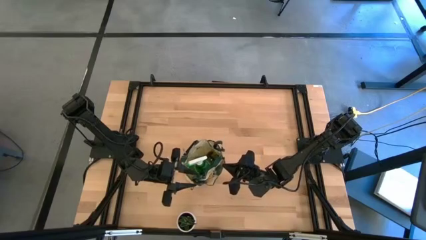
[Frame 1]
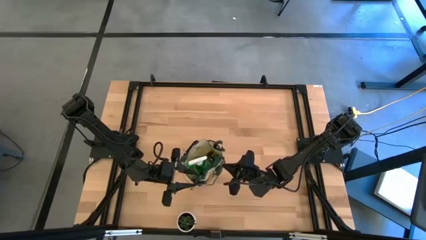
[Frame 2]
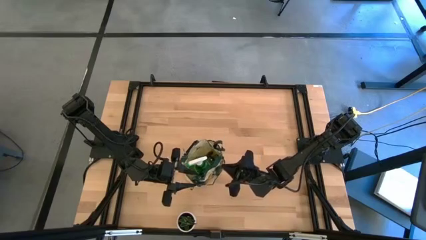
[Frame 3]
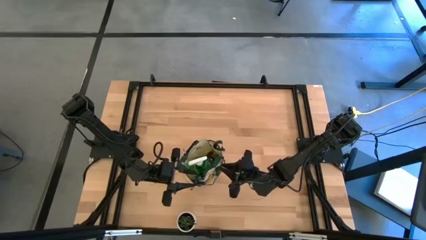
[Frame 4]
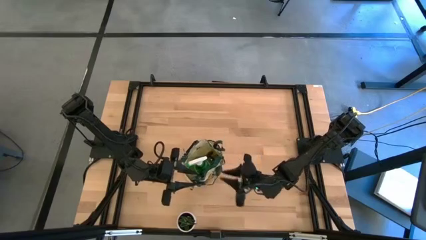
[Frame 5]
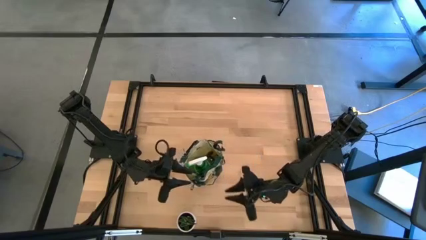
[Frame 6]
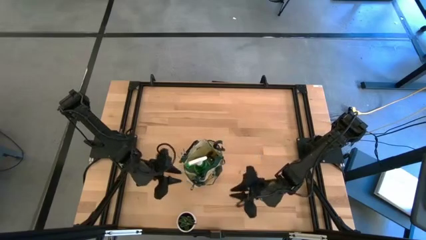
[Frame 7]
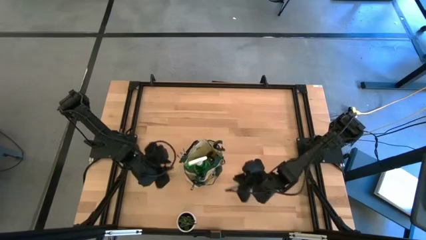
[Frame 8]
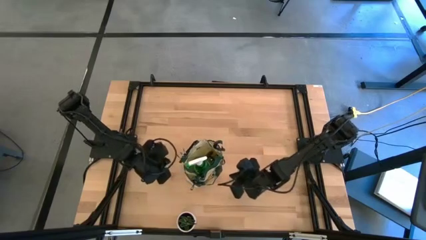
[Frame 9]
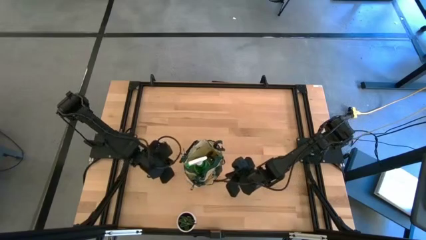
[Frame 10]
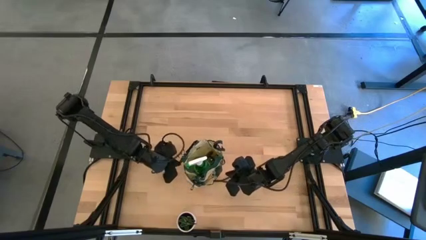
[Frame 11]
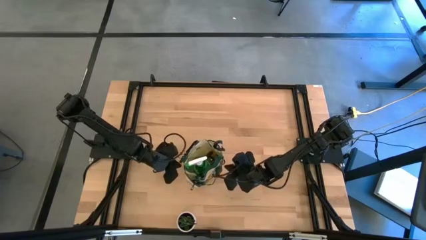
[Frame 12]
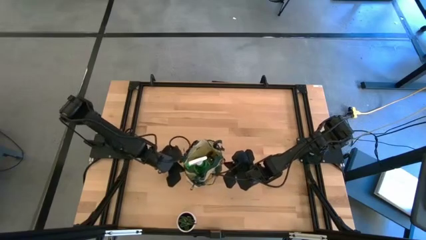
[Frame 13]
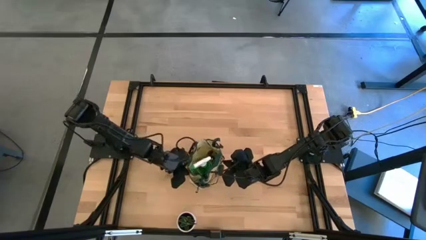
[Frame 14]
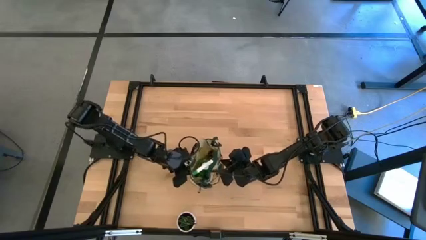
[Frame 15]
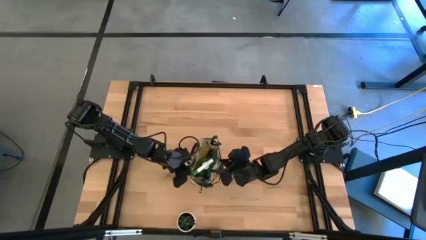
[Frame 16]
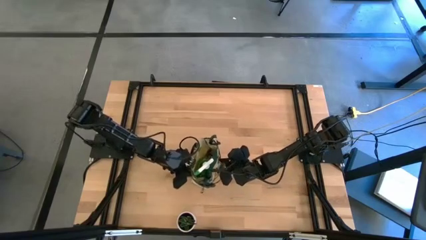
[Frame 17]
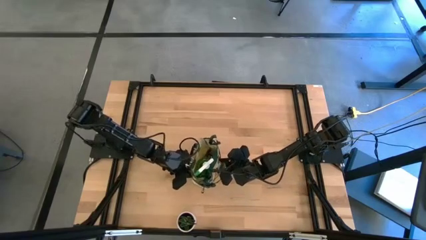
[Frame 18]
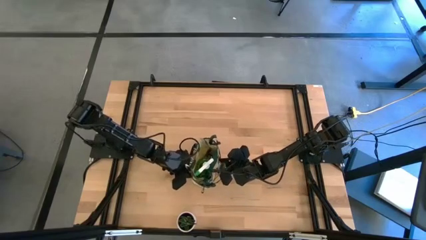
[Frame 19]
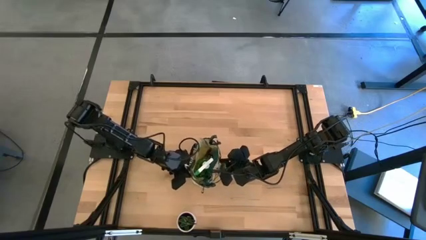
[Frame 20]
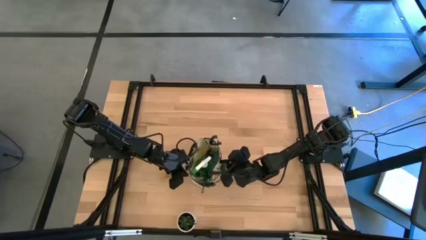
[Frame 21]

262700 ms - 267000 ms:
Task: Pick & Place Garden tools in Gardening bag
Adjust the green gardening bag

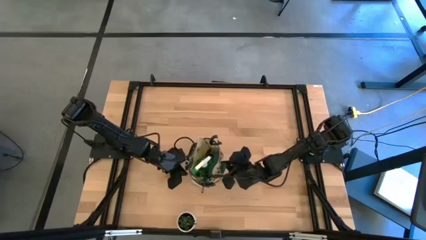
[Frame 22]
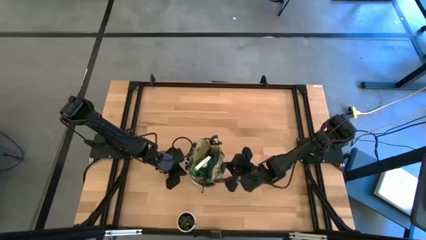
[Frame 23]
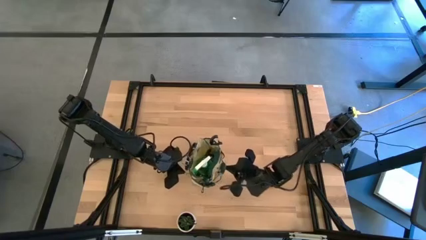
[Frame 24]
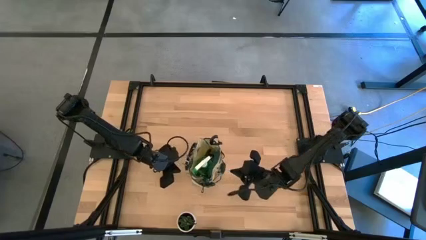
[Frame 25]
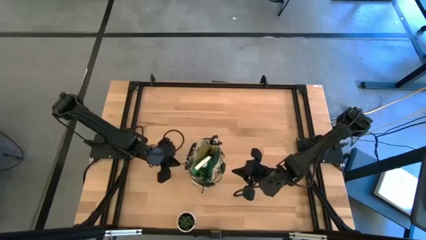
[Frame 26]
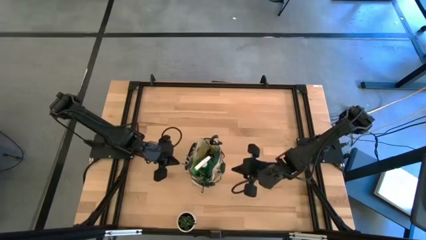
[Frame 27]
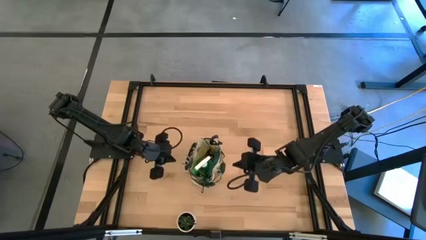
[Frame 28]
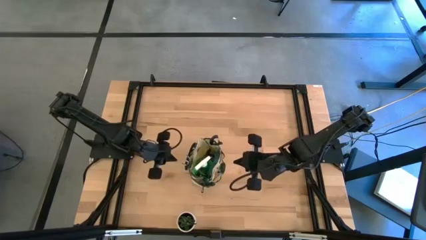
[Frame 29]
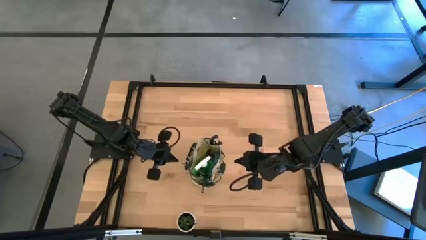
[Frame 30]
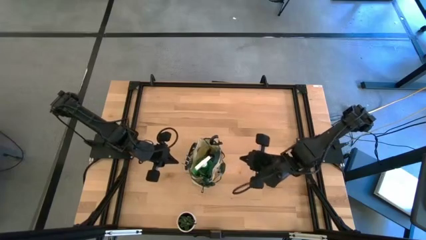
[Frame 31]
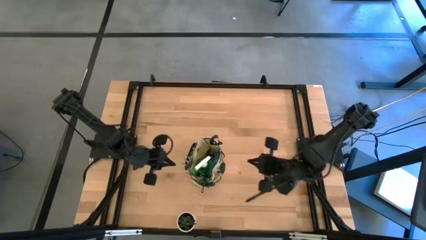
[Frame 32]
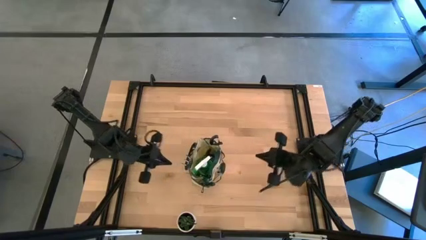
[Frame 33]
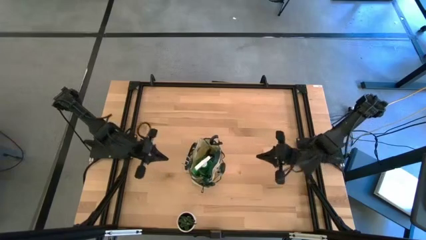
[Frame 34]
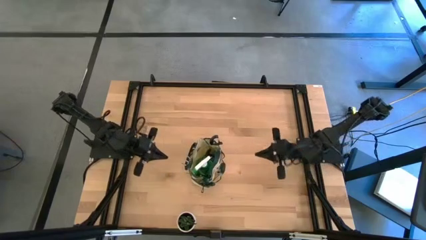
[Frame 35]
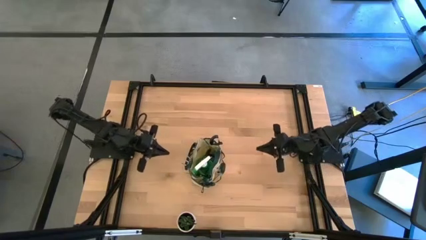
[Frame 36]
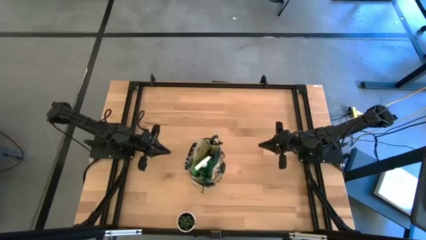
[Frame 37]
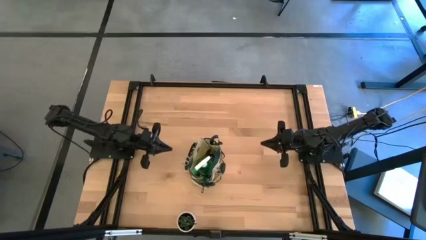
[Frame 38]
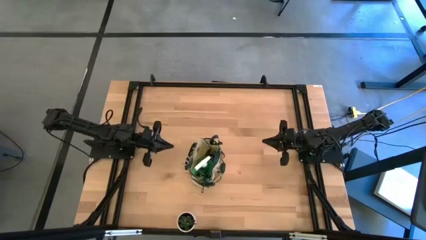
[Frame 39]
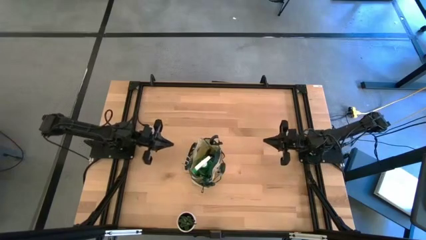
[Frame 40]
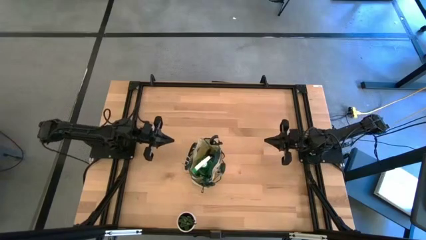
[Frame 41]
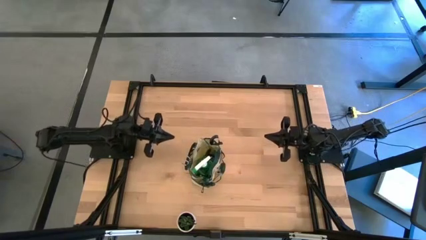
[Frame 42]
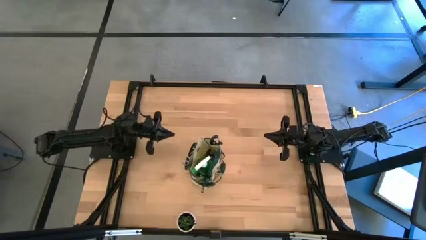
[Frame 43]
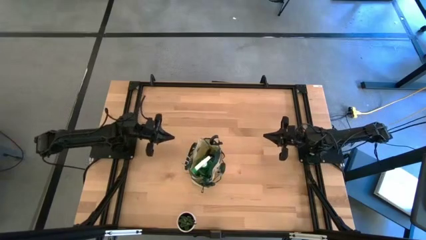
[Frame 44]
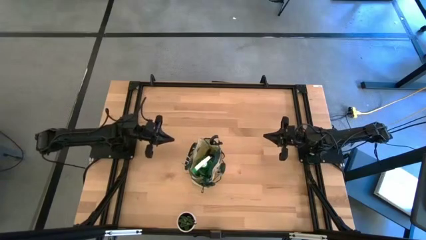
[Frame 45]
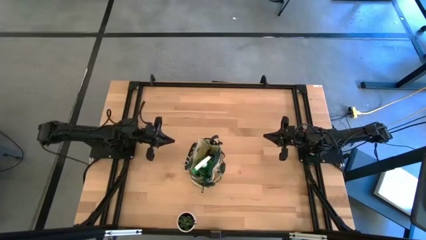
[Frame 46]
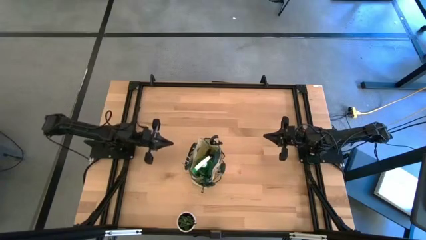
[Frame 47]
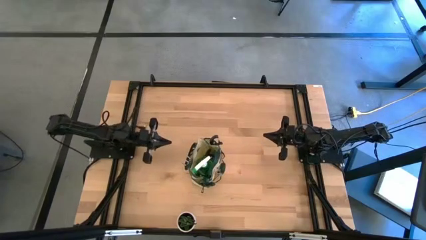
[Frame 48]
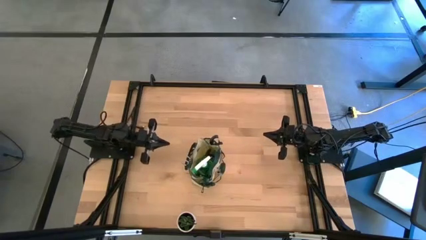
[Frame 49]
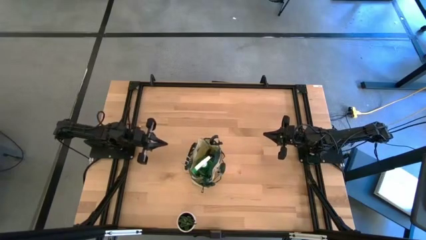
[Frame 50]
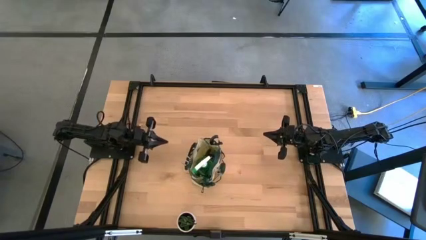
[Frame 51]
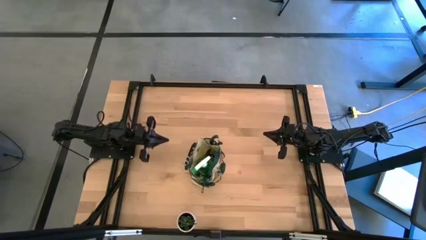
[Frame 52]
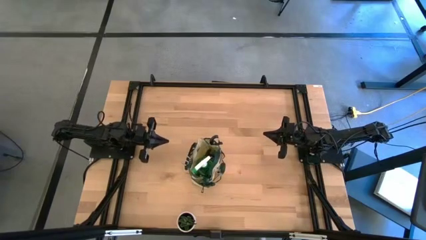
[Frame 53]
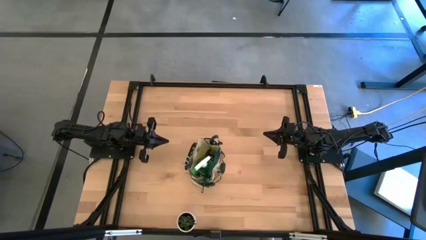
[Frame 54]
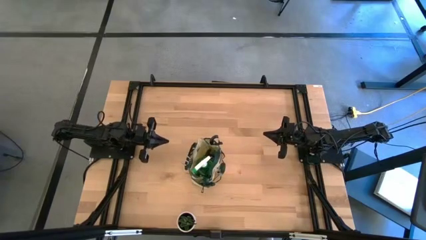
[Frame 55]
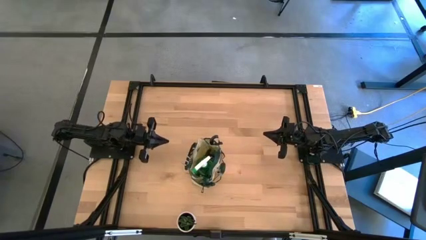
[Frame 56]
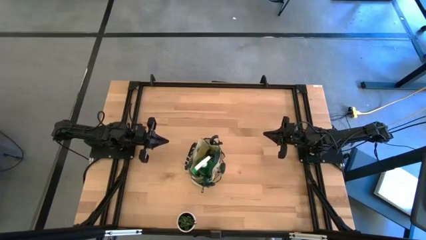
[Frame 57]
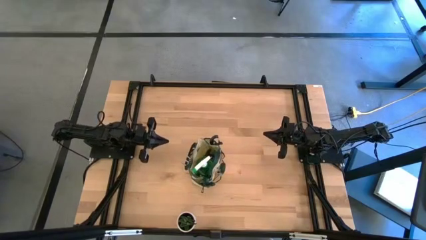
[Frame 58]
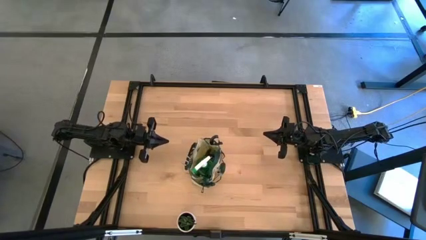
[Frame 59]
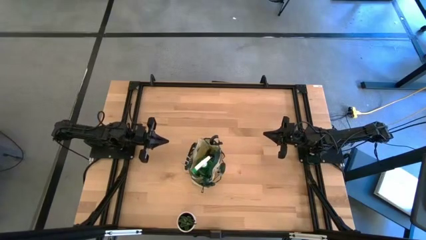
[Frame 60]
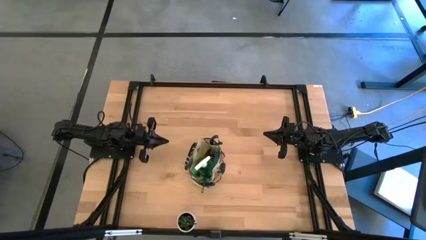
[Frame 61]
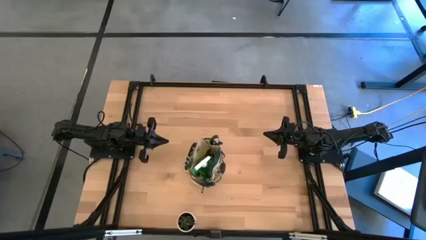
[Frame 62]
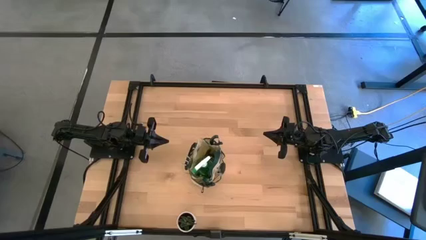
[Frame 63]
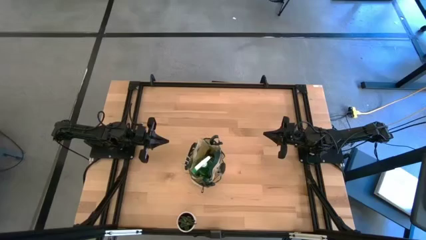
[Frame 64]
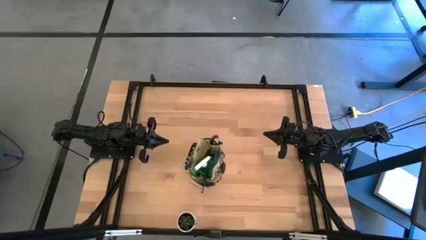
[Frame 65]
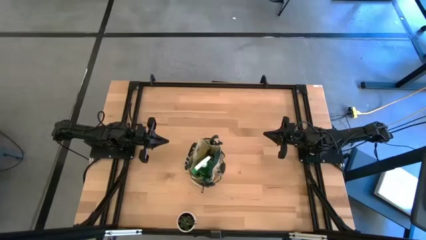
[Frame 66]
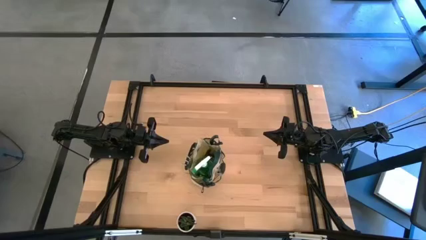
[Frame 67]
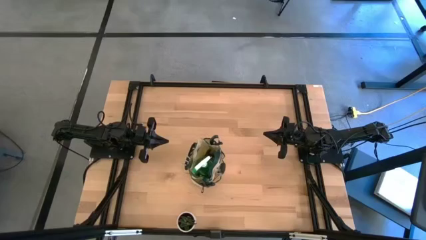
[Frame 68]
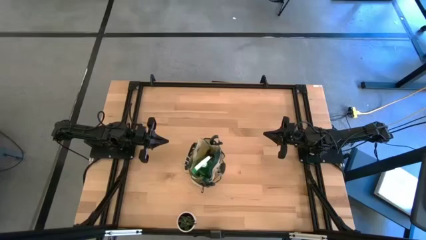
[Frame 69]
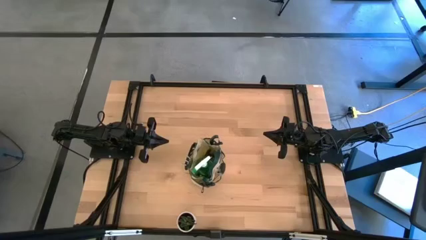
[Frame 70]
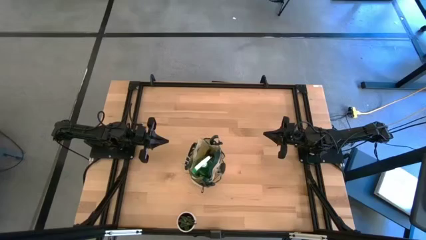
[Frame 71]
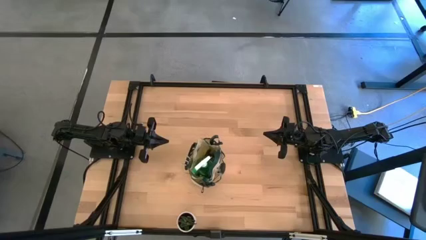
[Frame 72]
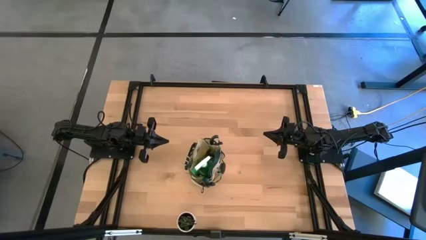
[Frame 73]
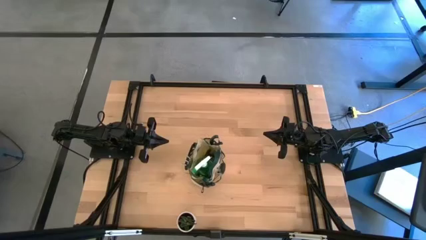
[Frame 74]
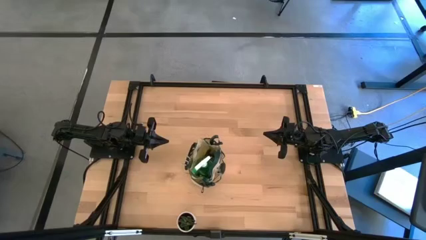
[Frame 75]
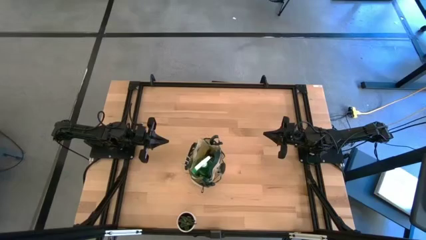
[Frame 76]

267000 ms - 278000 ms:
Return to Home Position
